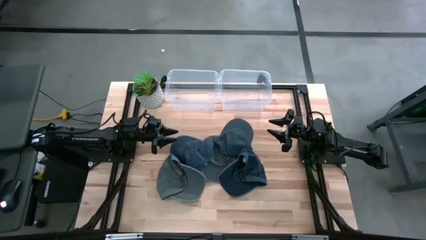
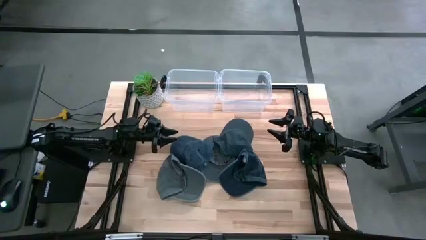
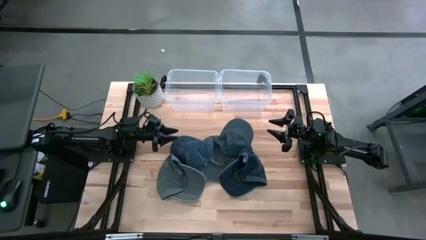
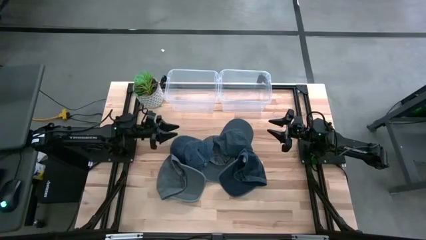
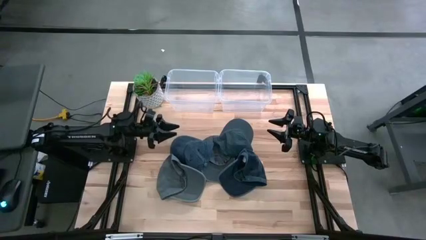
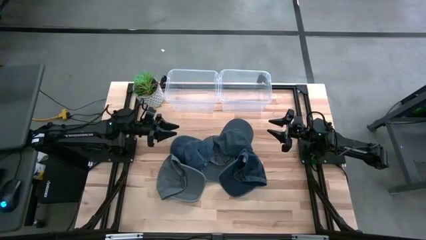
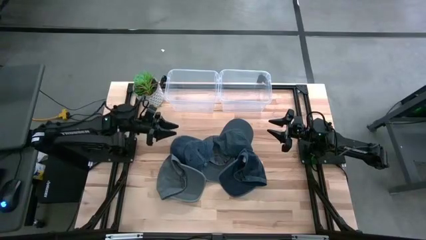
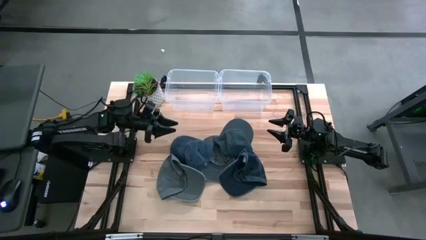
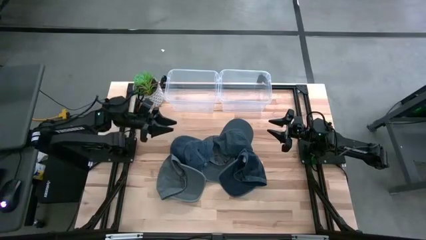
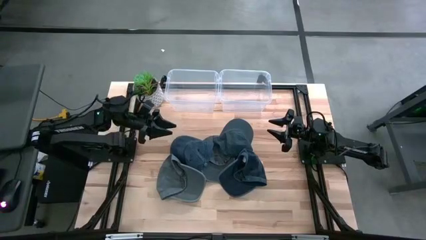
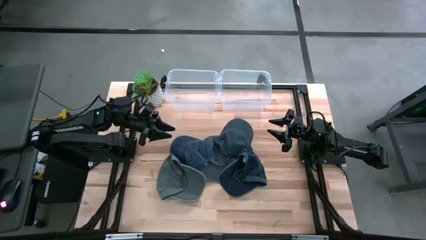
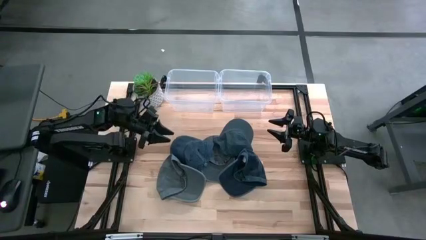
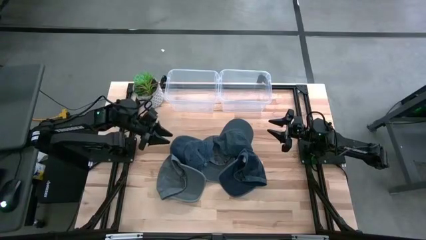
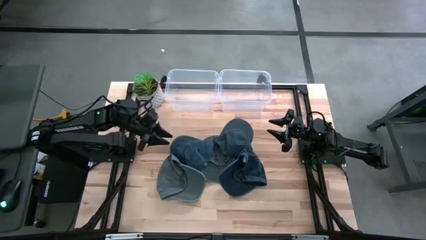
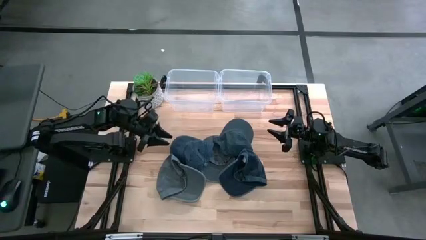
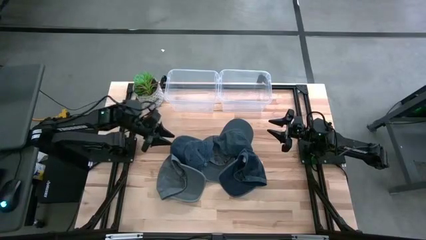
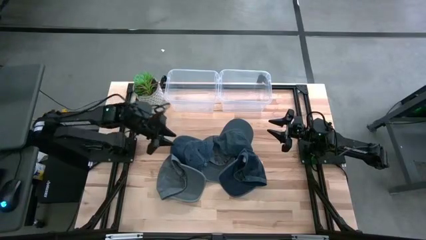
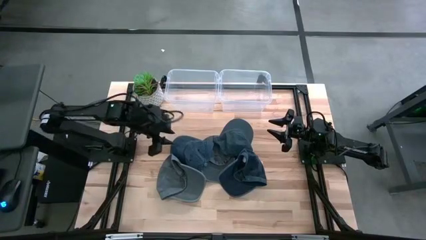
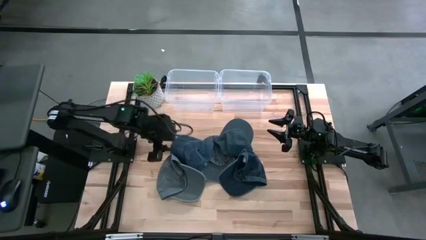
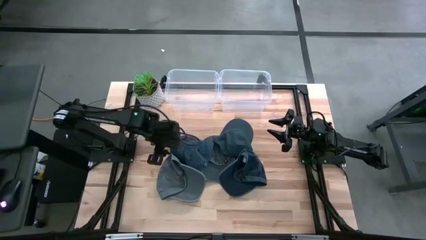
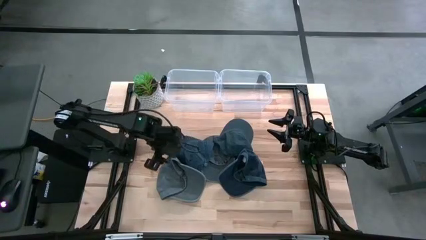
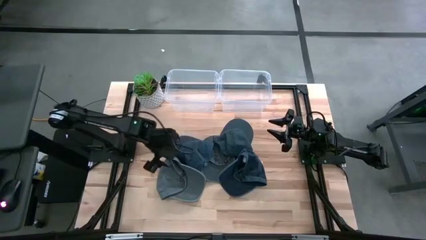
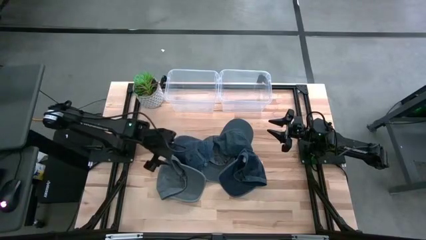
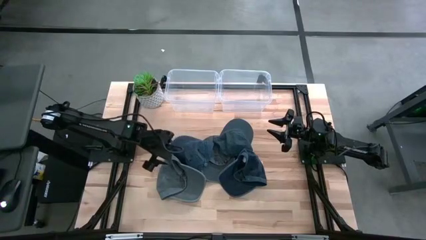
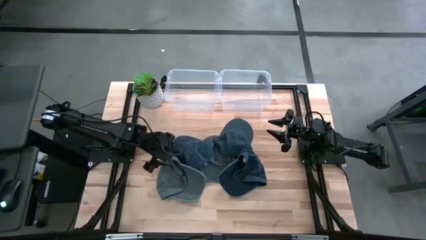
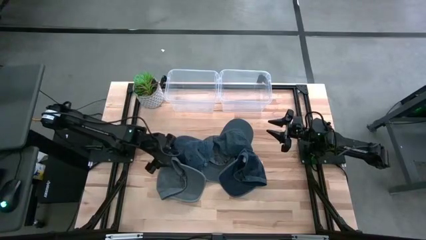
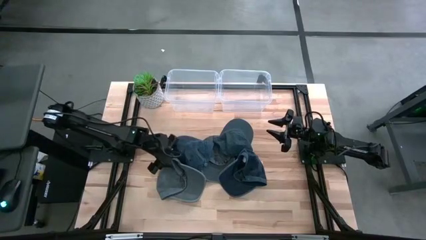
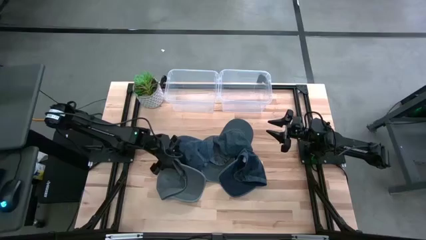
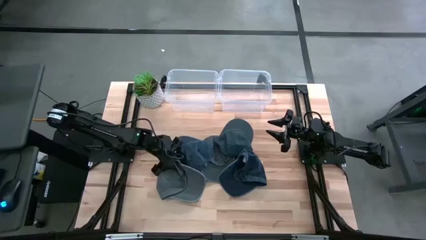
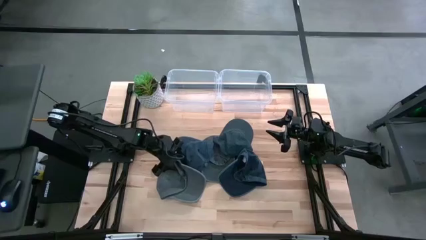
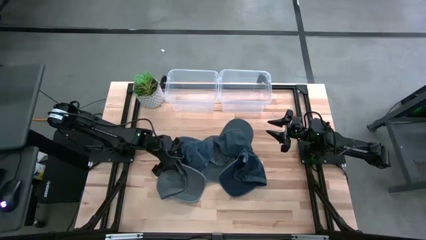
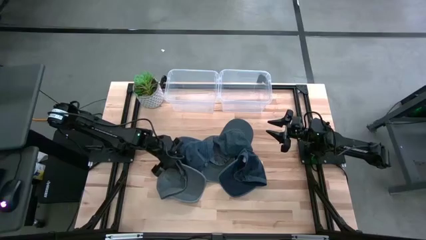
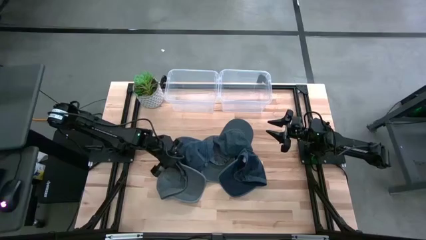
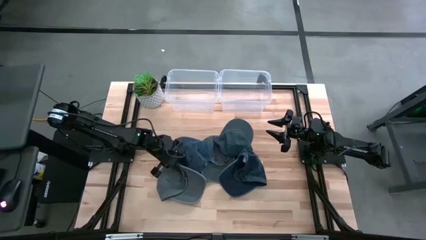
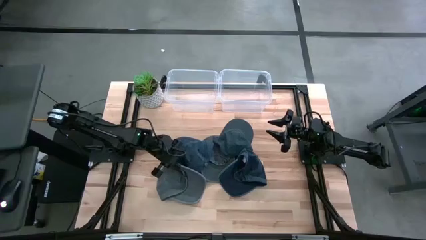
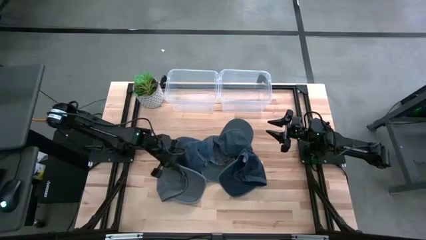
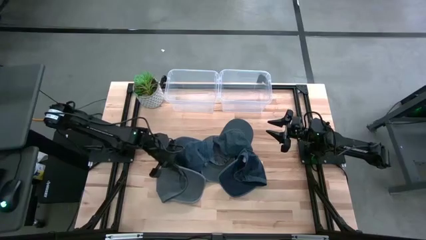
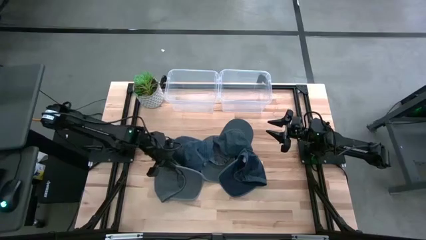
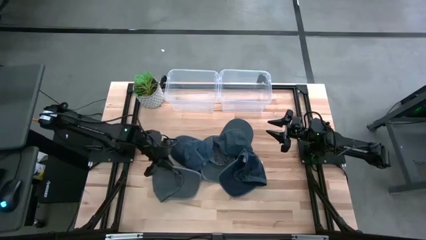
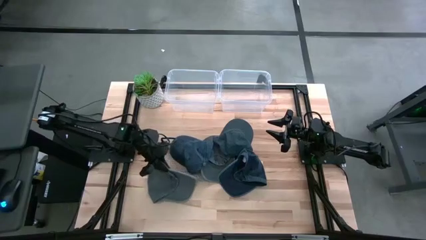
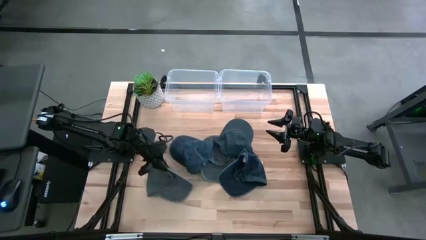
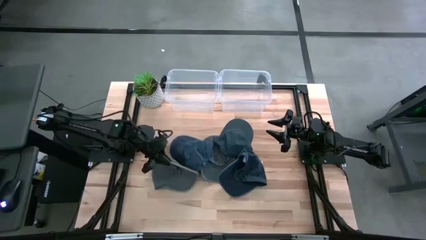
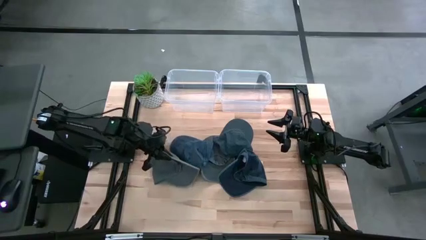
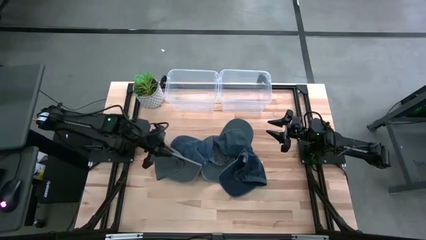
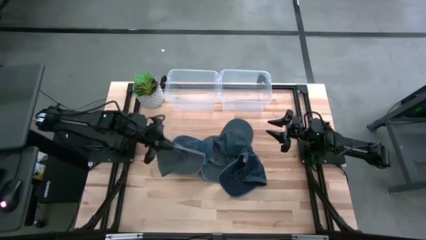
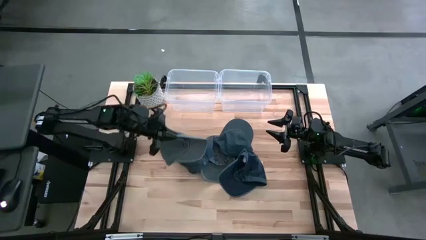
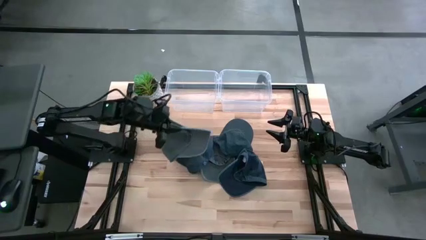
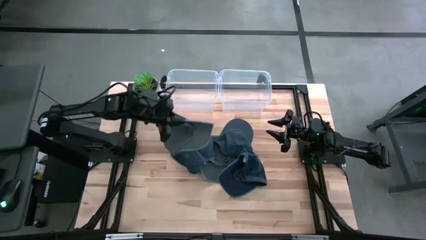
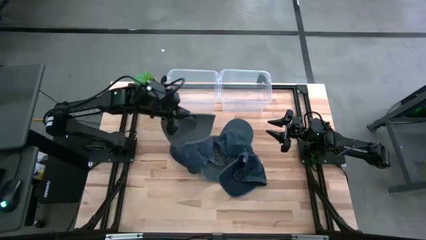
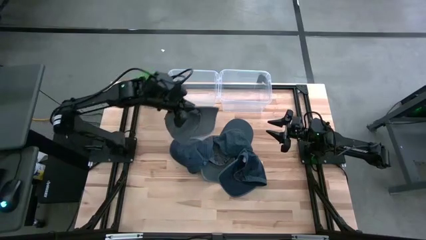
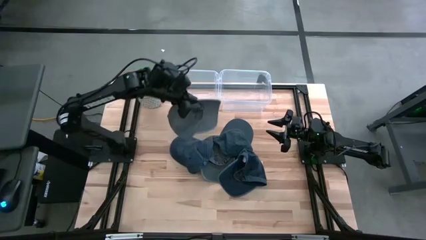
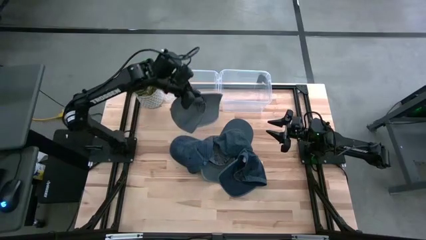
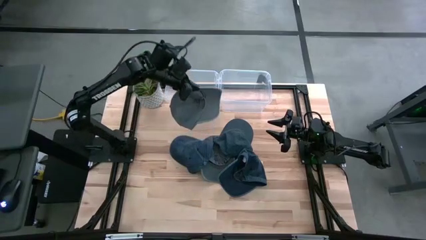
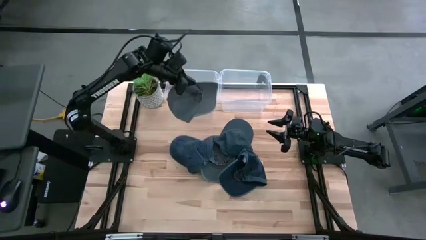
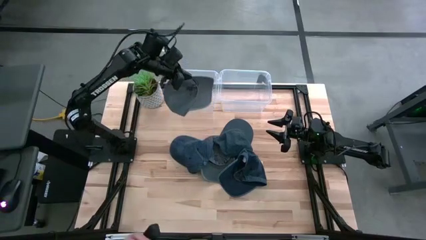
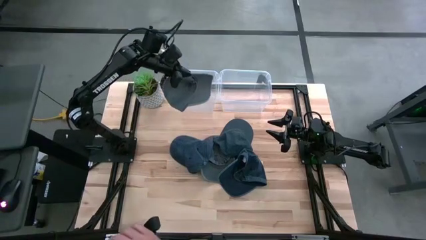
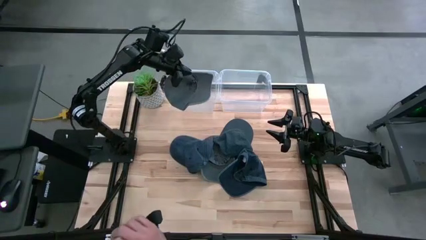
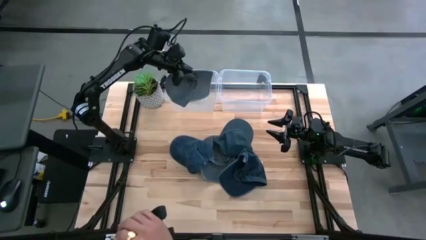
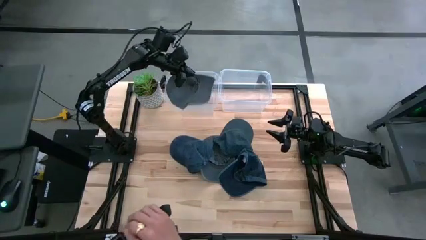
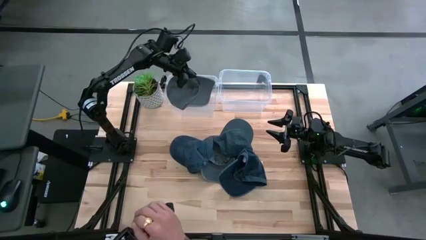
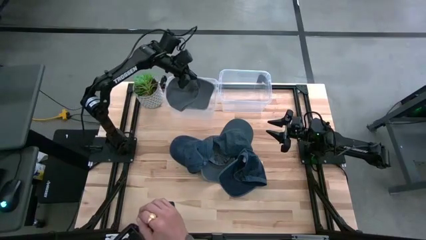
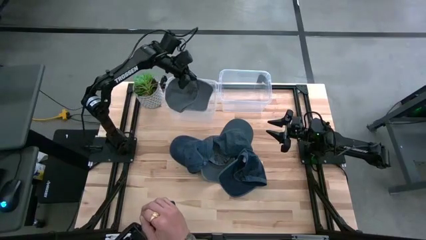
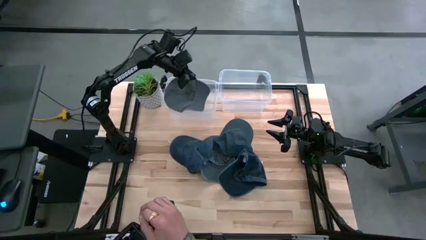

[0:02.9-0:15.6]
Task: Pick & Place hat
Put the left gray cap into the left transparent bin

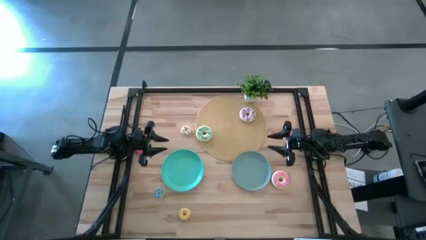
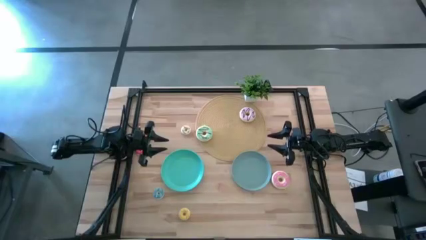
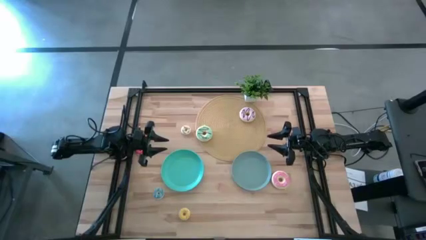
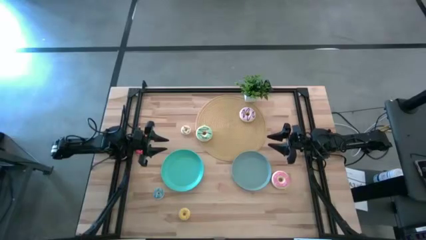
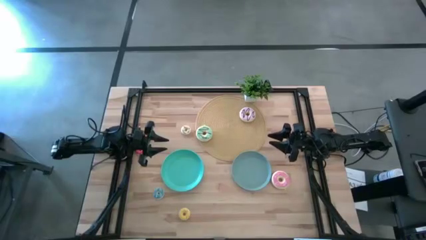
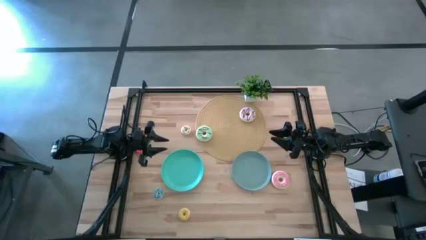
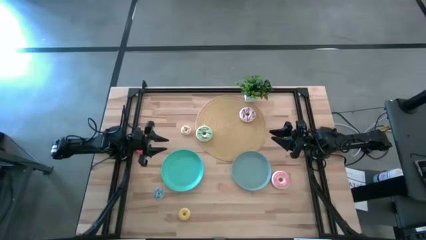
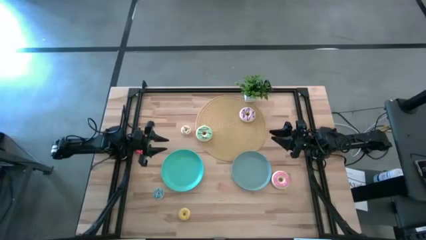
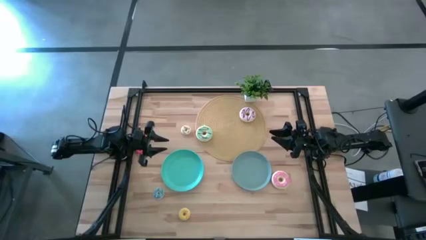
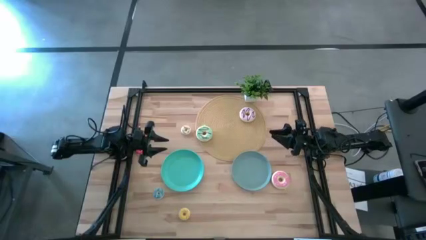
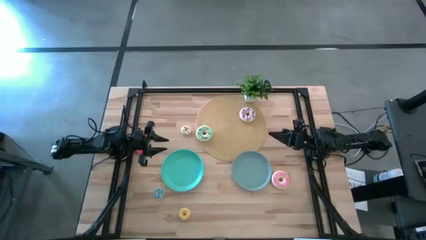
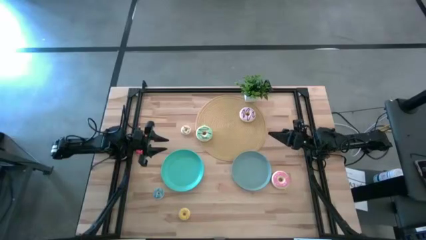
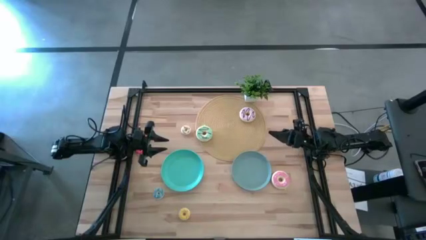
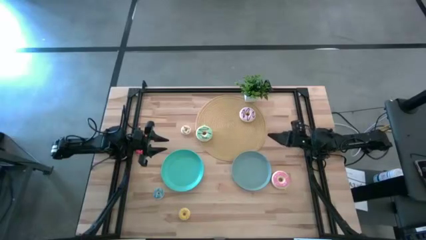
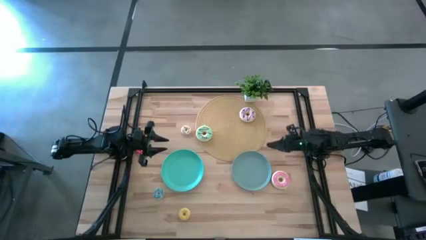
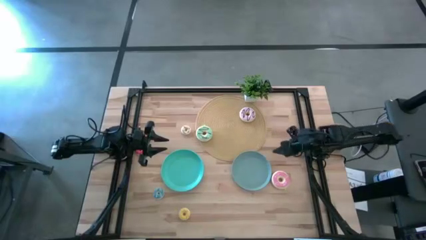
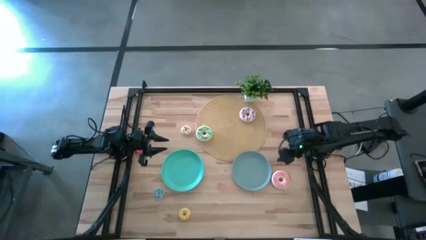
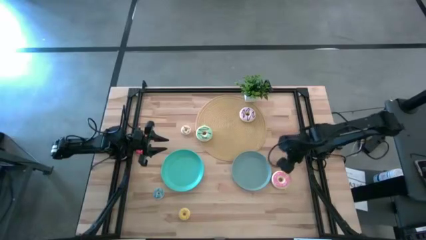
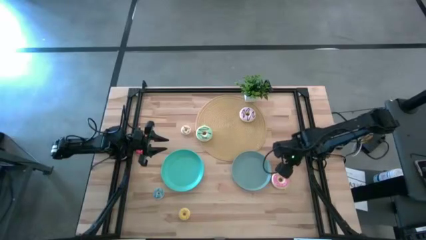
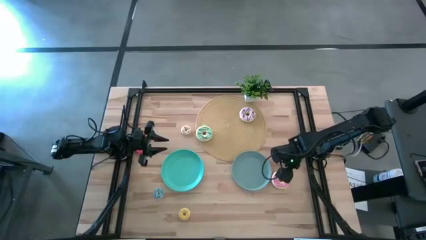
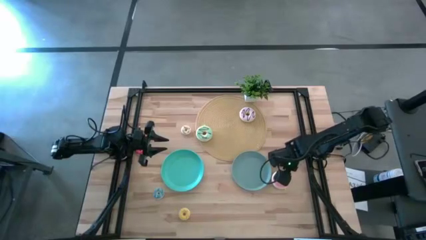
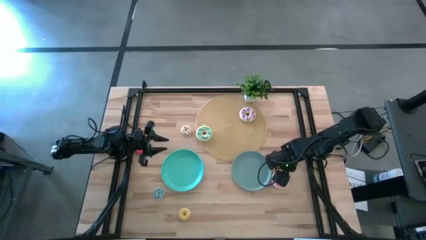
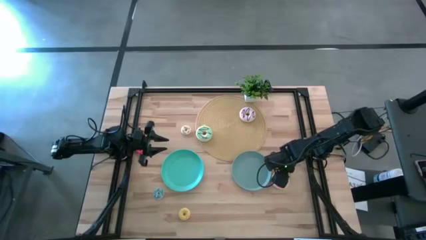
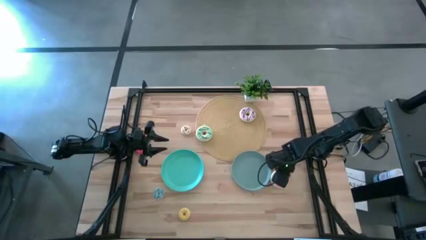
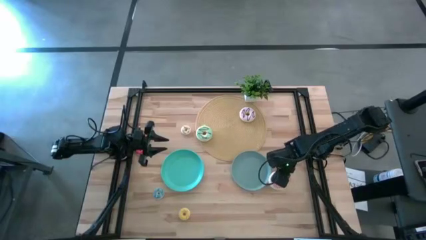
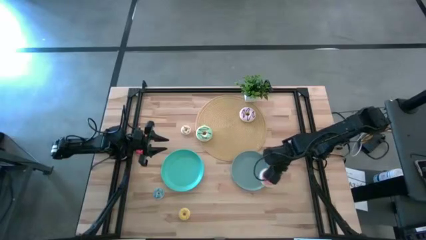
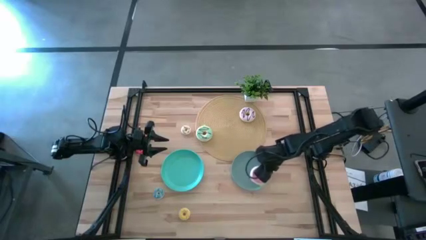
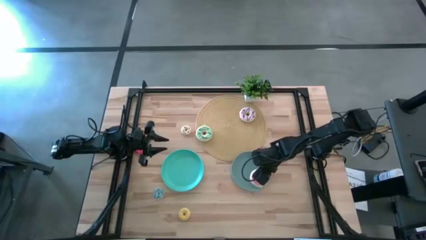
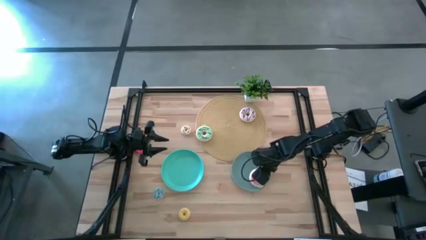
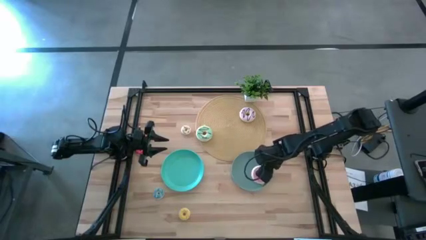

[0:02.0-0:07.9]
Task: Pick & Place donuts
Put the large pink donut on the gray plate
